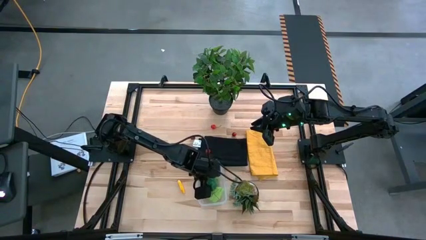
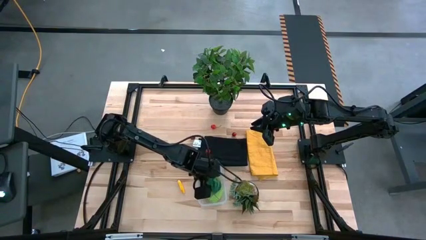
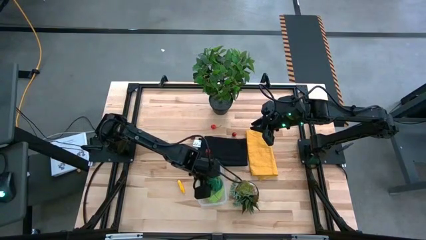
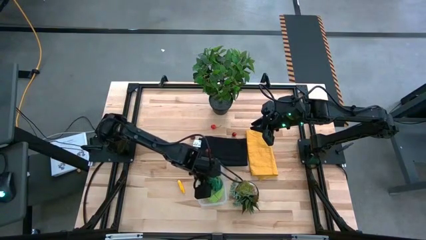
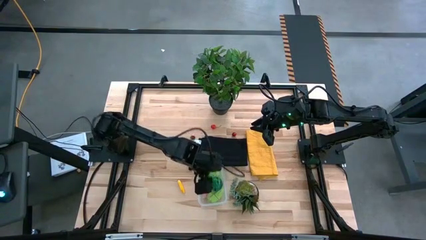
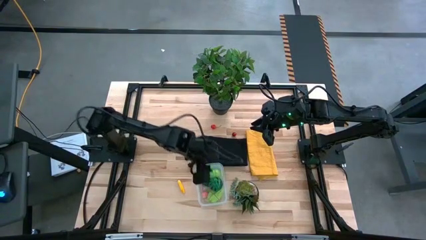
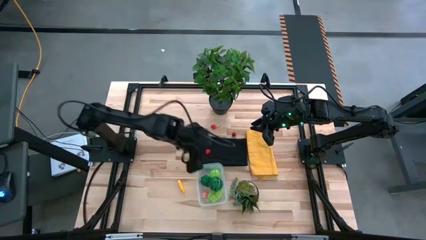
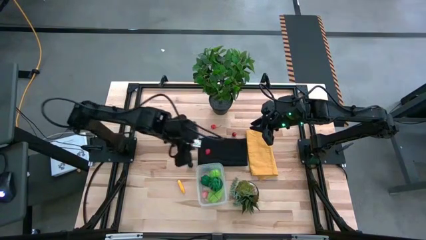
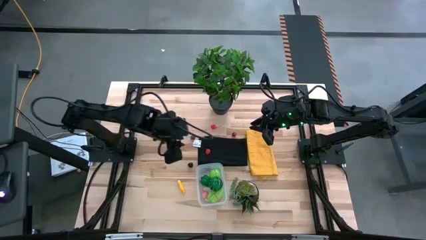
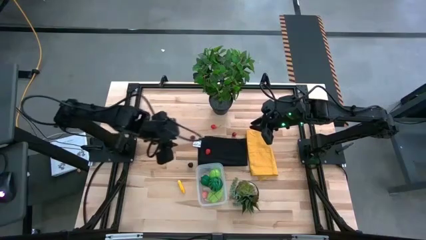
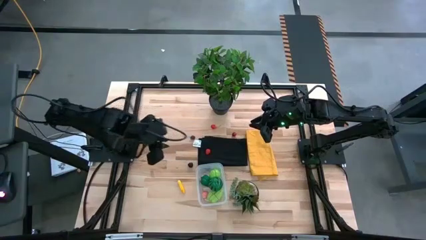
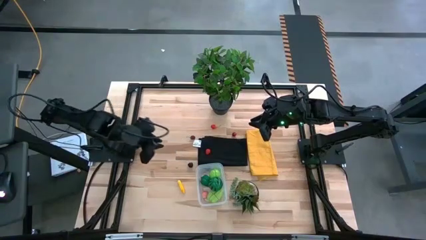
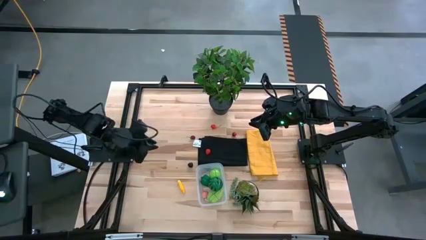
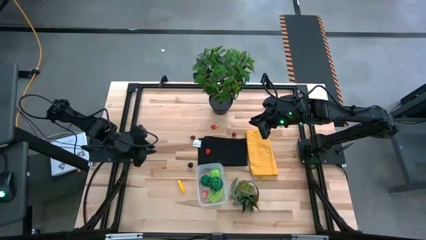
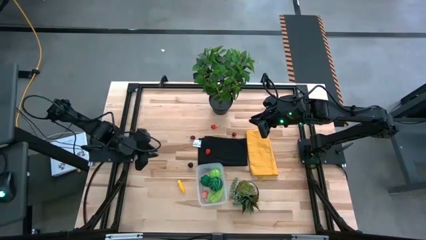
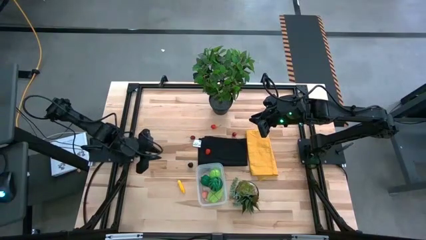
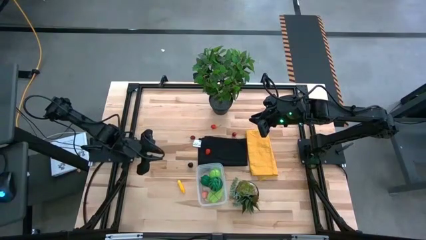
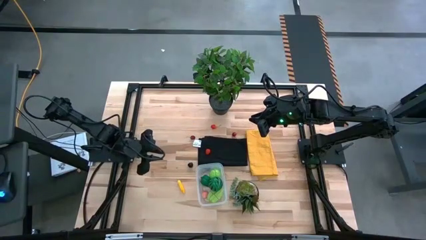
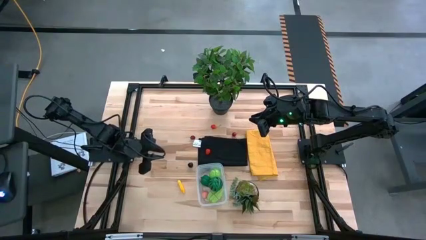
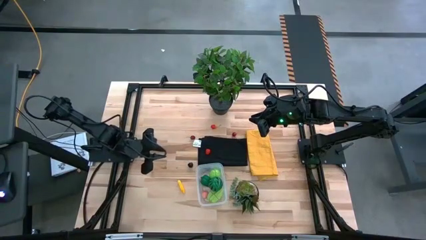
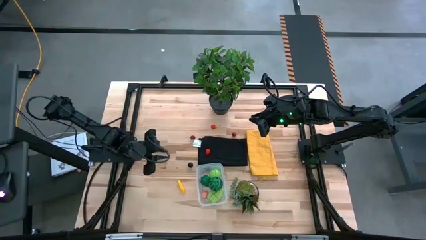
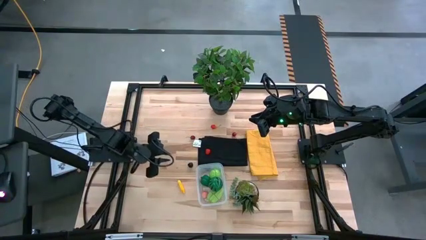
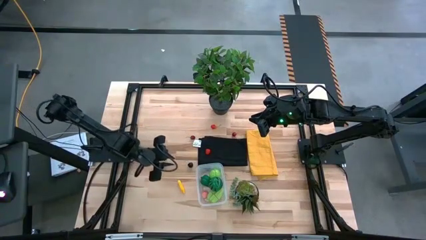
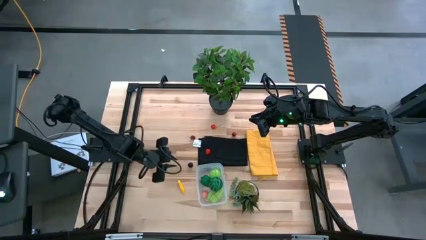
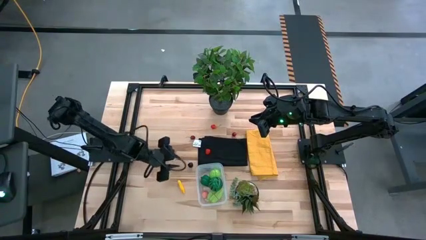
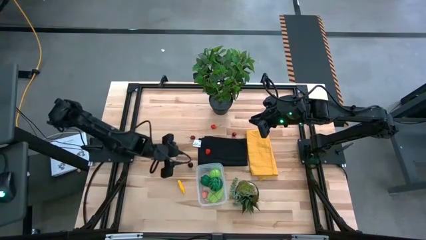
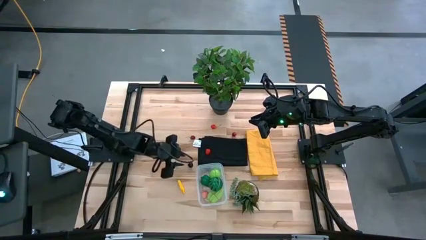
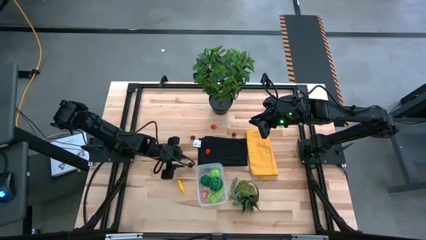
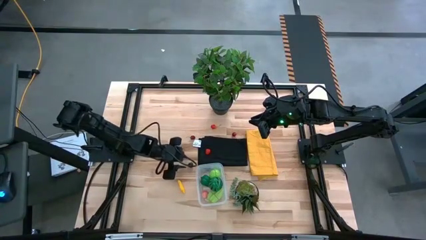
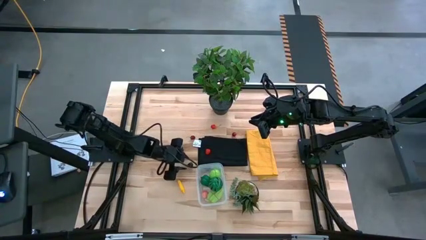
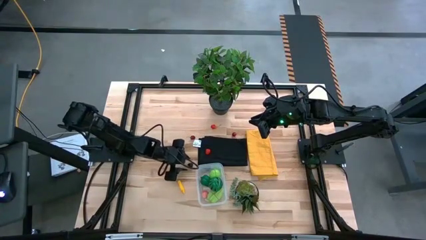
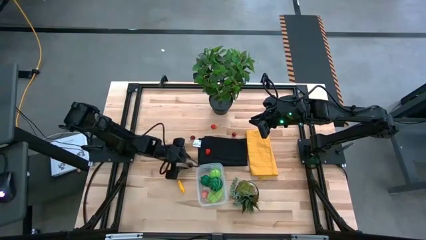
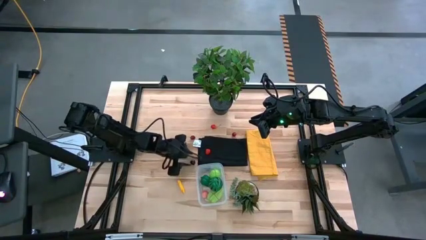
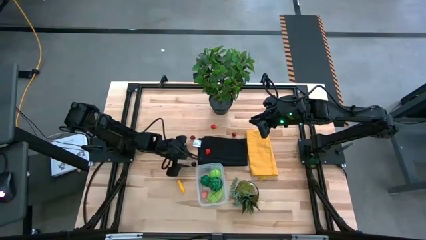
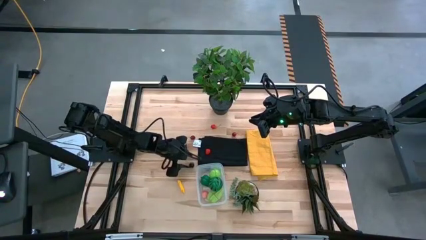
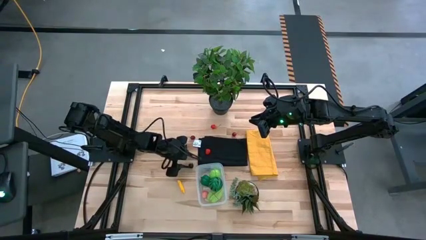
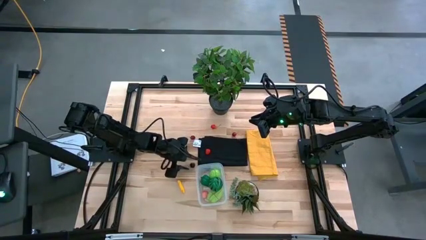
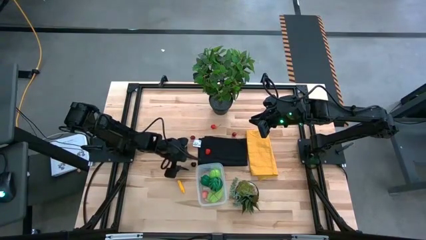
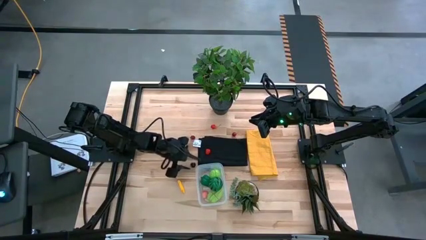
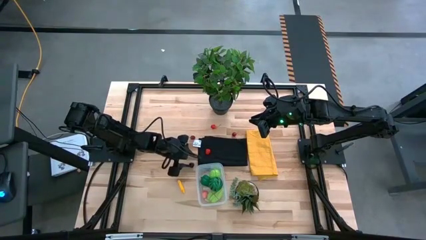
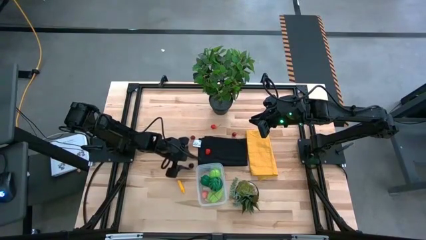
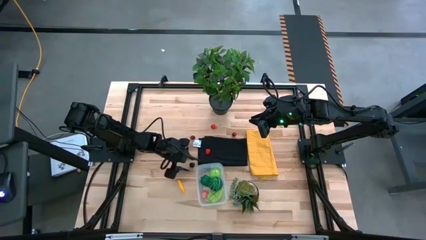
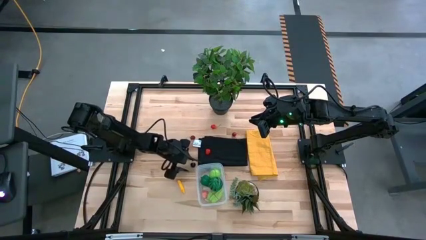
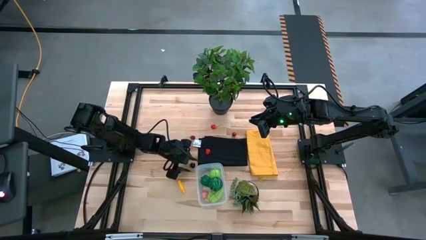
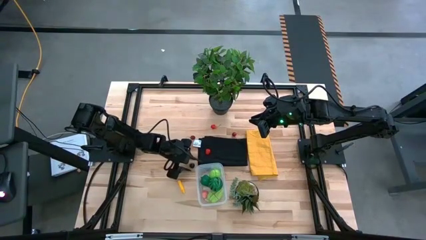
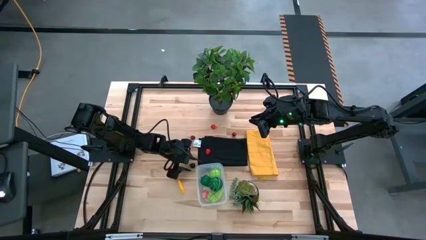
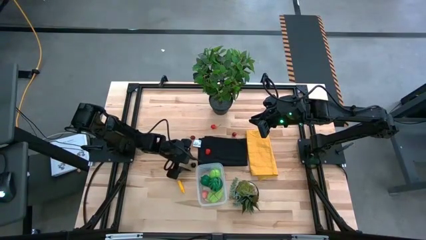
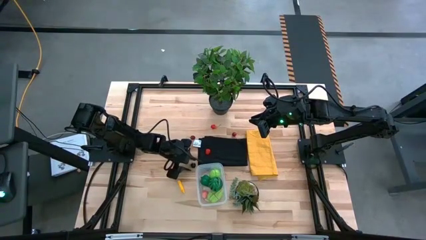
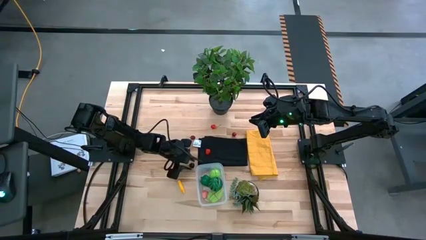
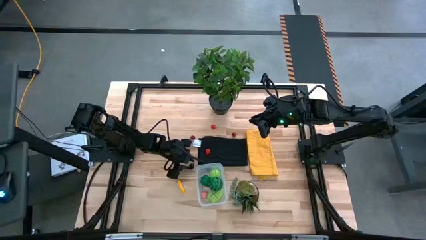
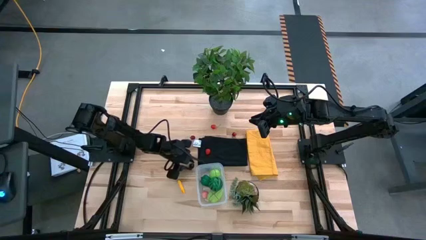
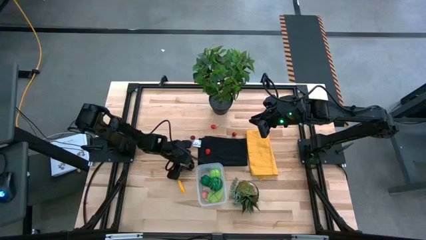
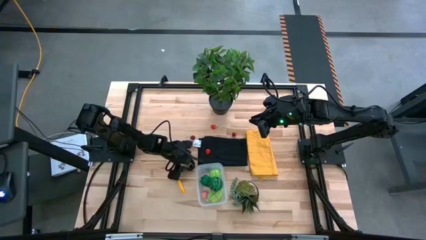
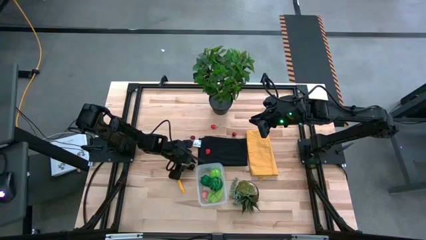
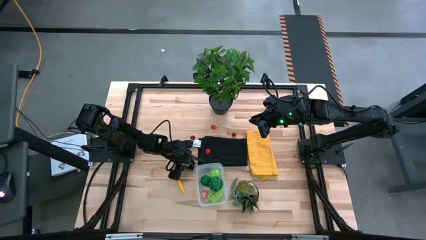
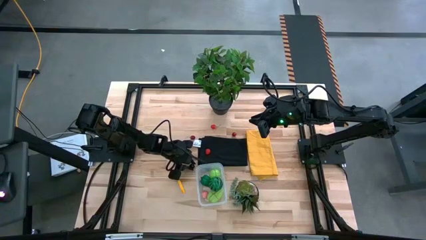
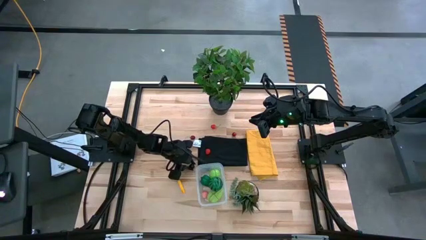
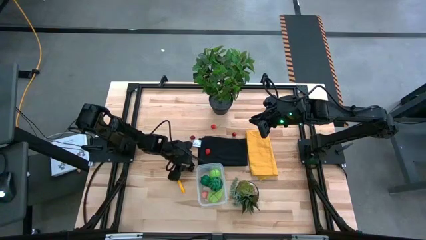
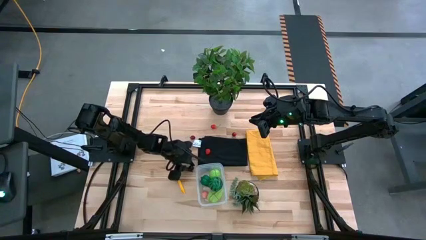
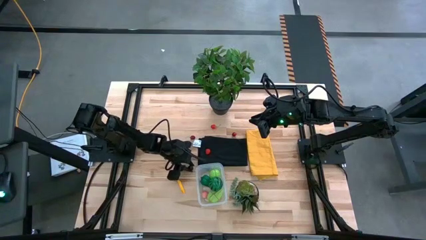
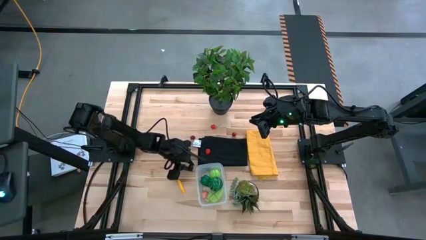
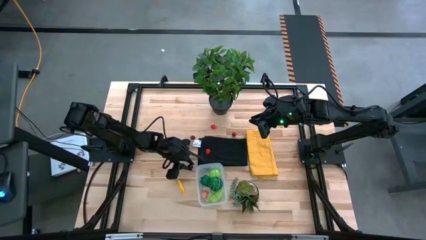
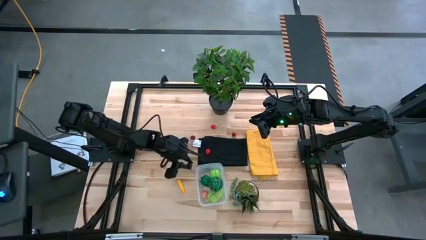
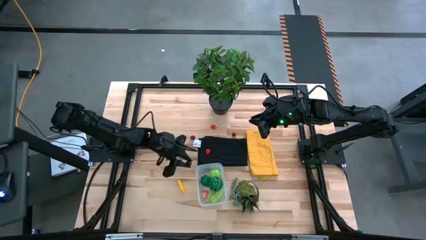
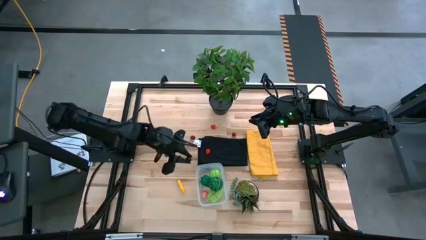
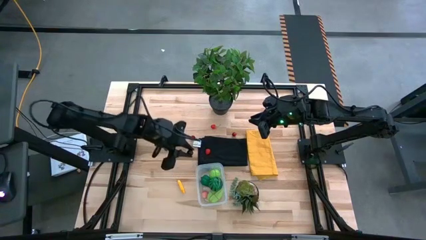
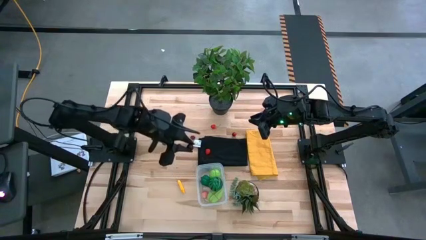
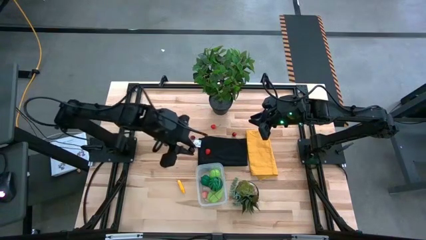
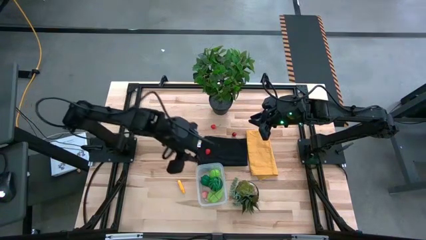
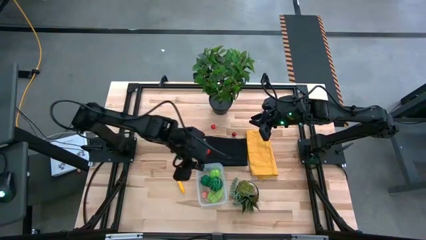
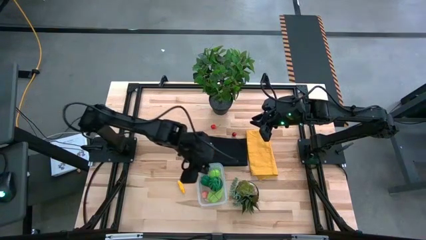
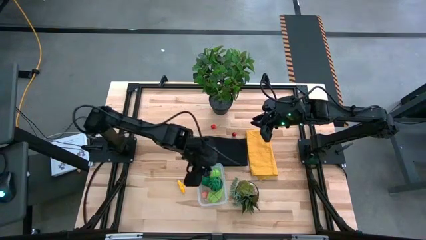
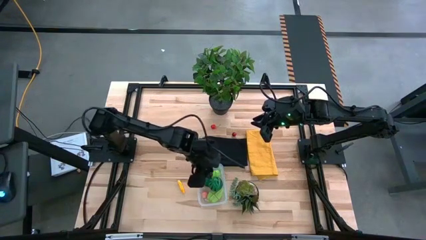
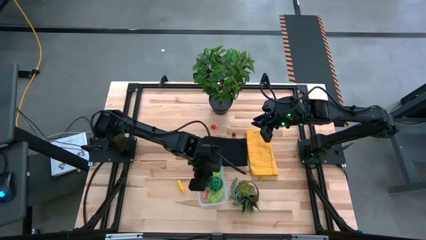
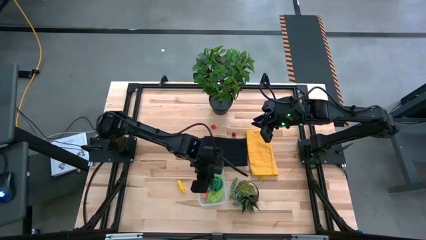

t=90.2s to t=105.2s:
Task: Pick and placing Produce into tupperware
Put the black cherry into the bin
